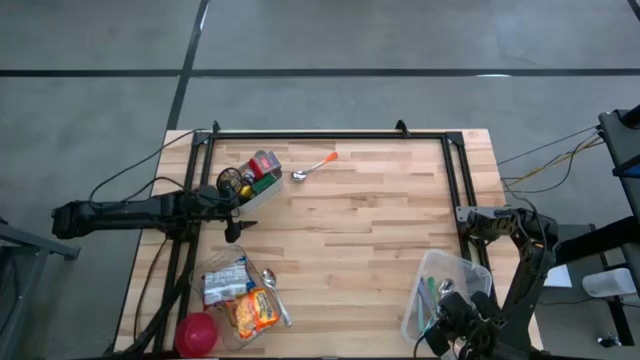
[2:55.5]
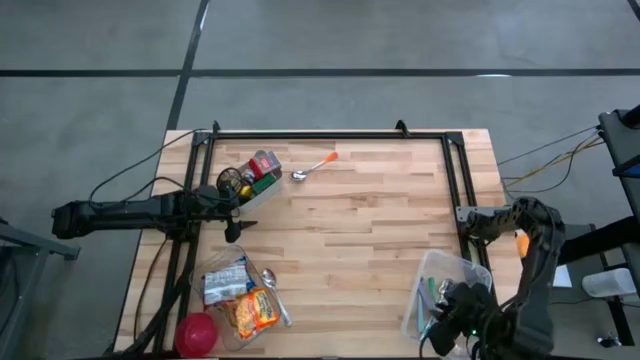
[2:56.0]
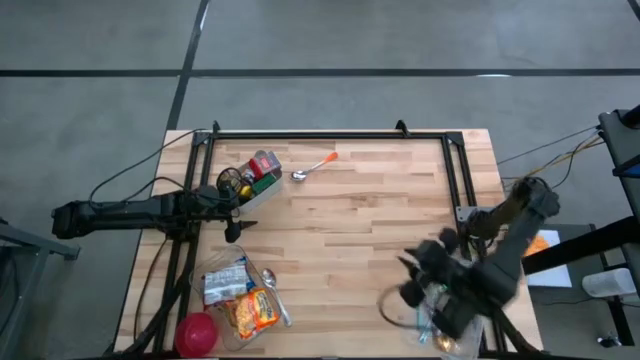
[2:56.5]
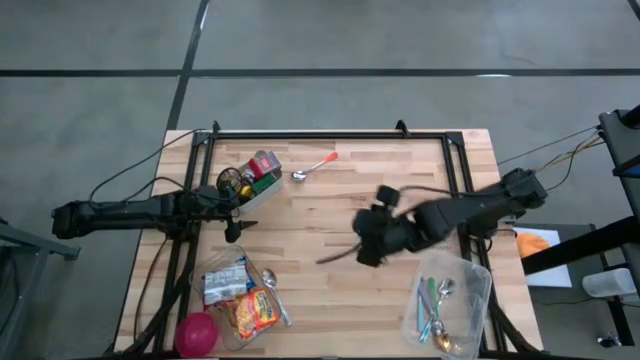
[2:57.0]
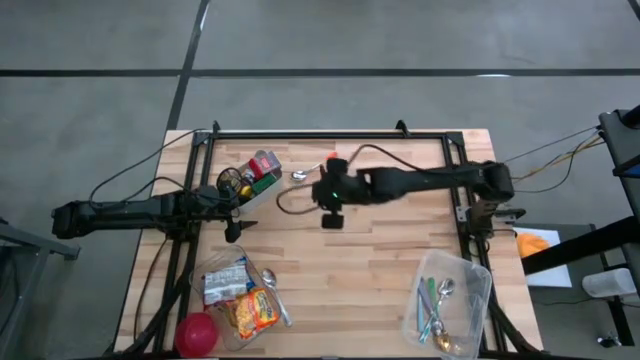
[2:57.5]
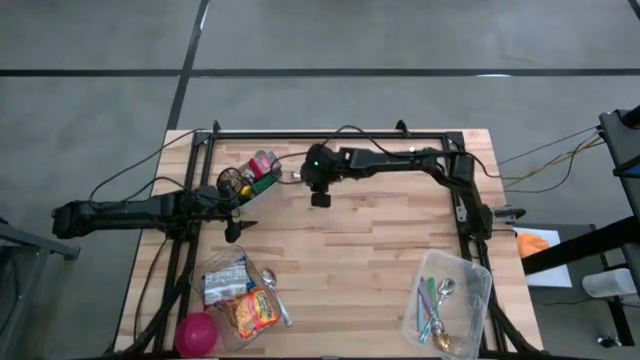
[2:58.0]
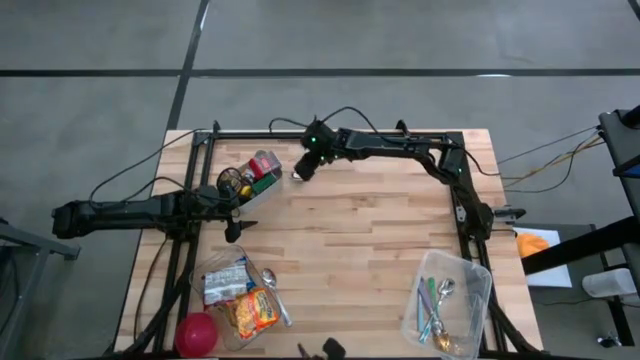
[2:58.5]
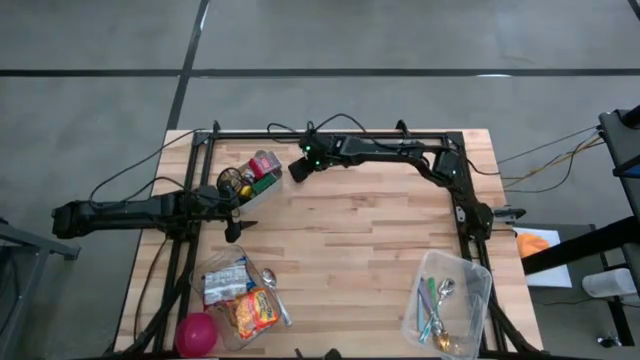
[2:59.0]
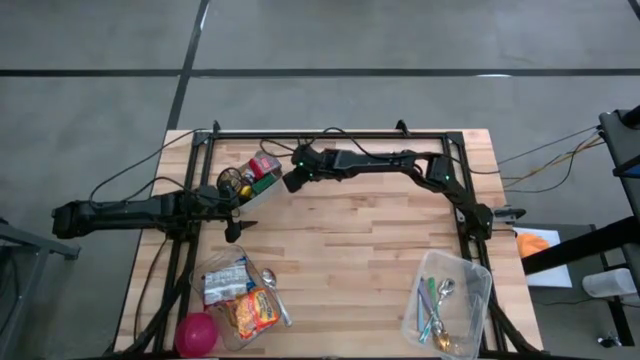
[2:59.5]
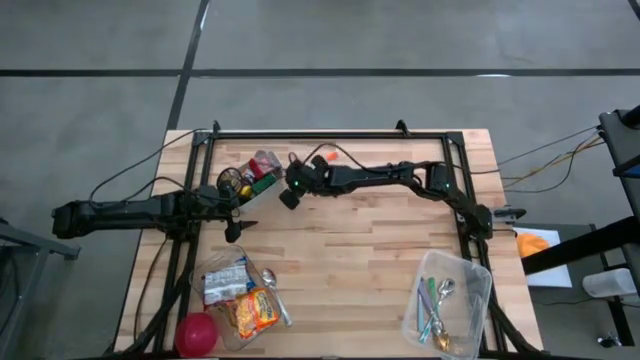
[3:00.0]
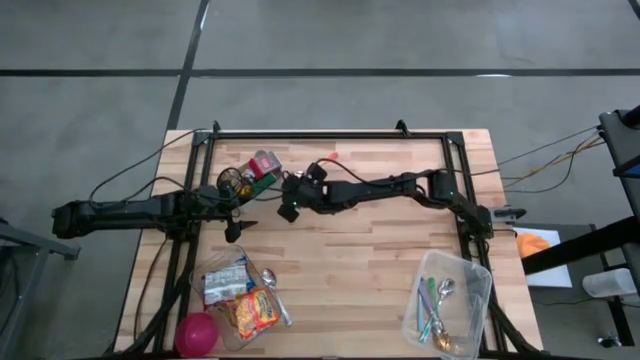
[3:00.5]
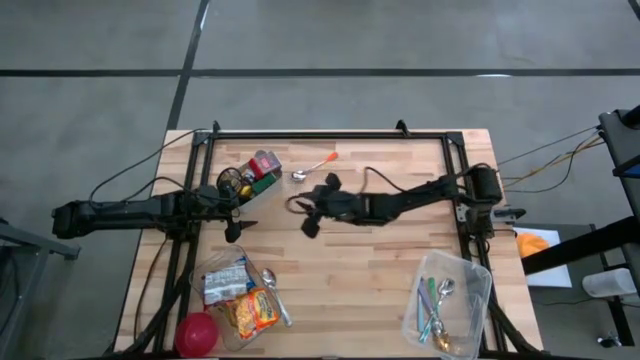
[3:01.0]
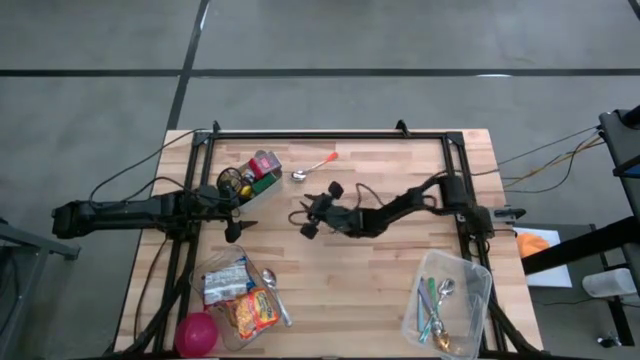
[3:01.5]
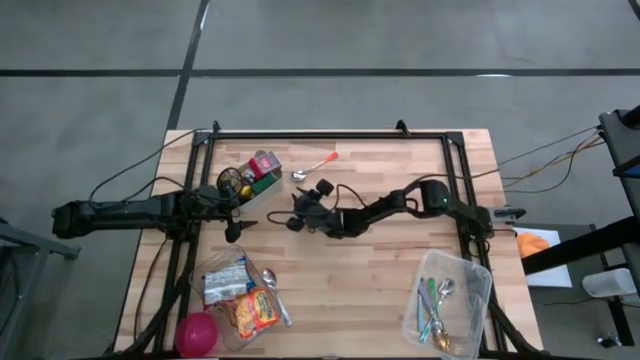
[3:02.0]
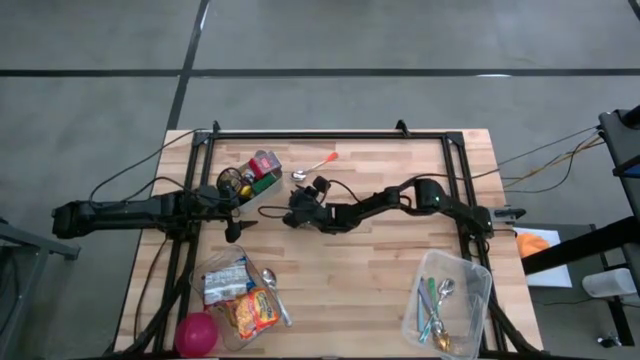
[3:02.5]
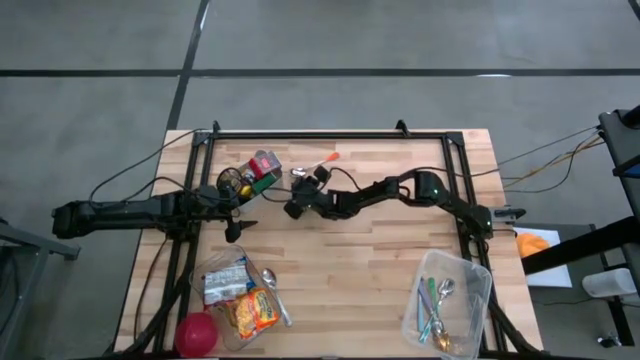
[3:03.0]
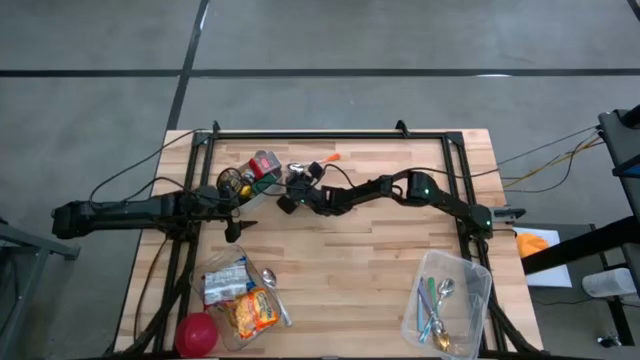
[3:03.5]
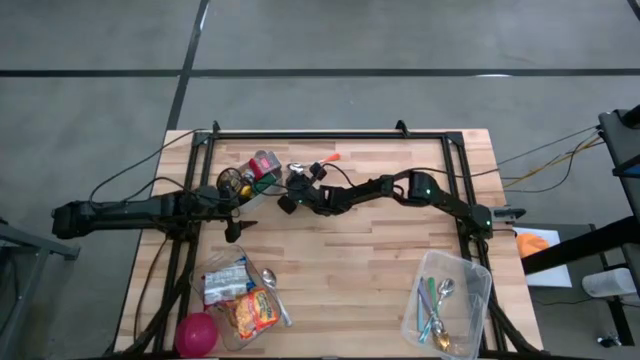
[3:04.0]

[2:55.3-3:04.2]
Put the orange spoon into the white bin

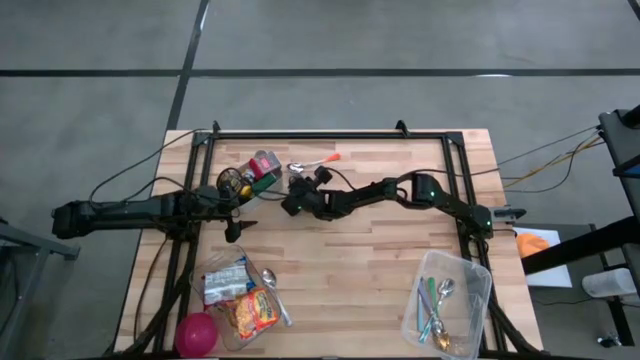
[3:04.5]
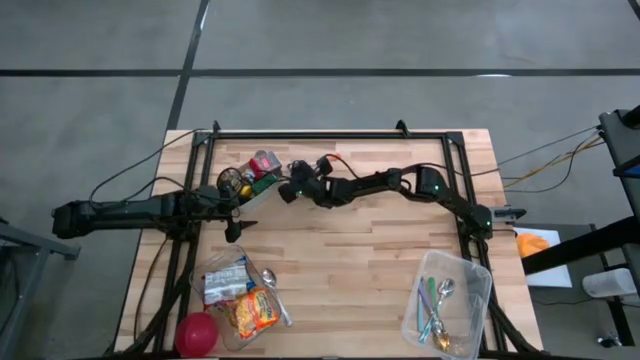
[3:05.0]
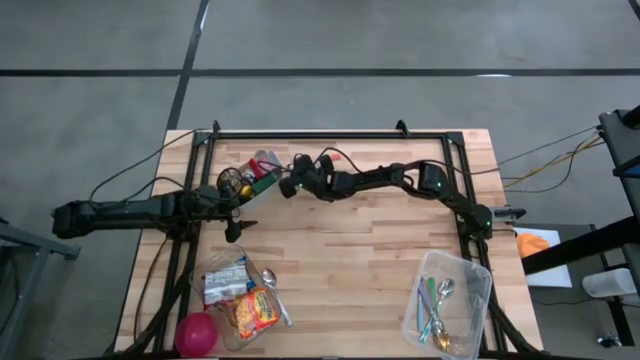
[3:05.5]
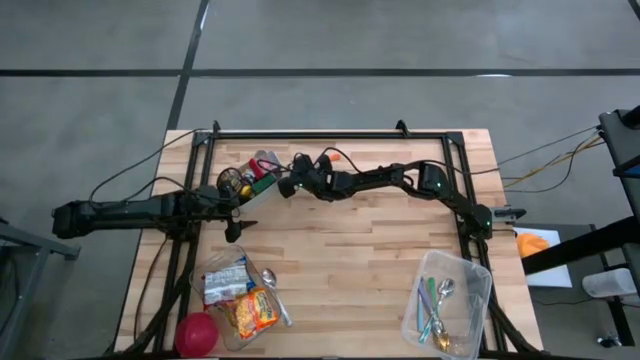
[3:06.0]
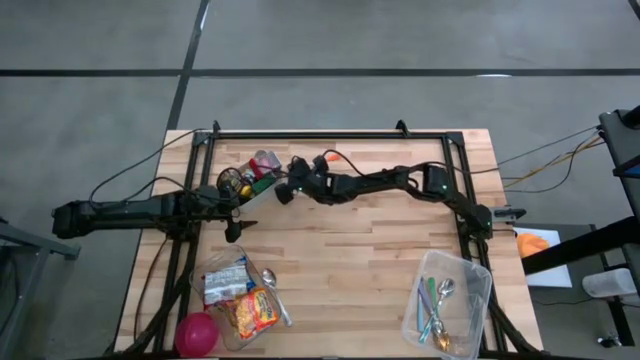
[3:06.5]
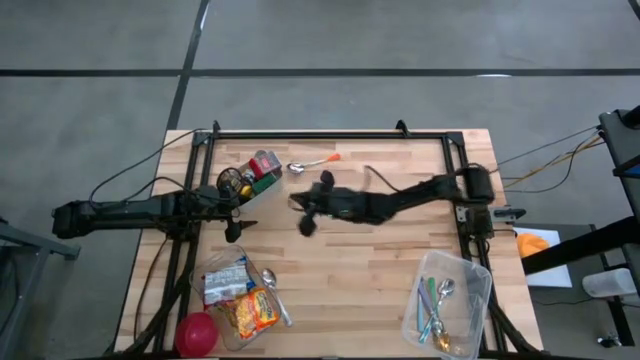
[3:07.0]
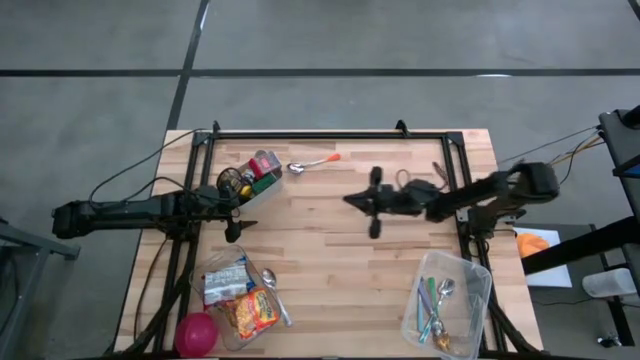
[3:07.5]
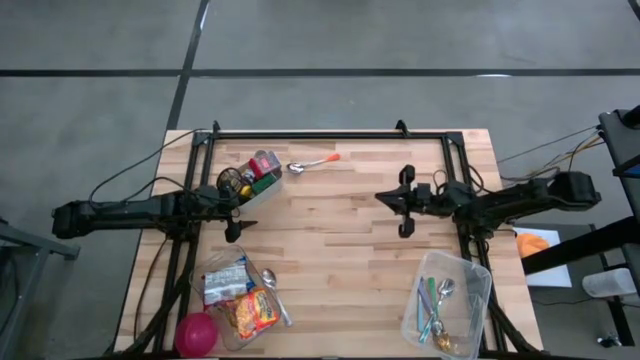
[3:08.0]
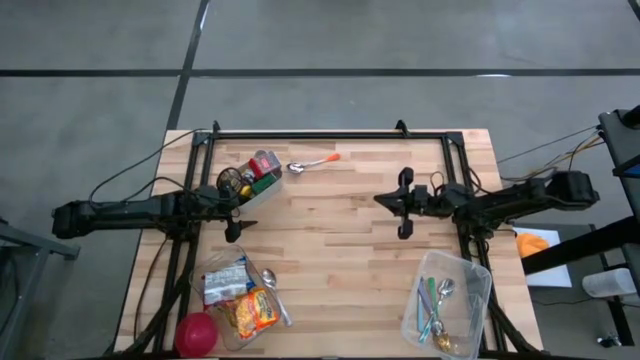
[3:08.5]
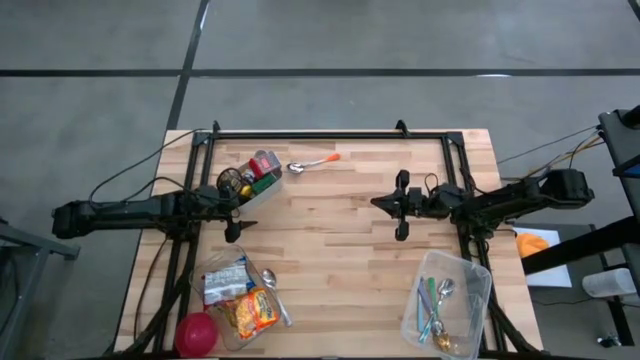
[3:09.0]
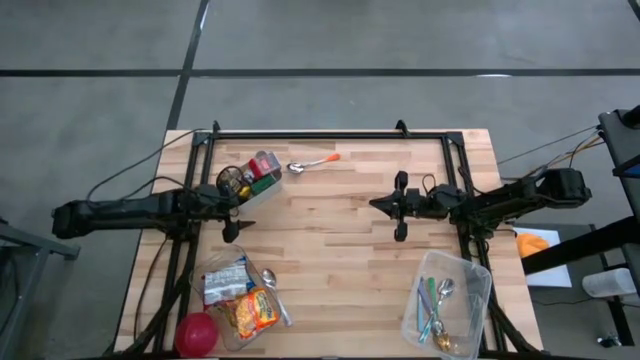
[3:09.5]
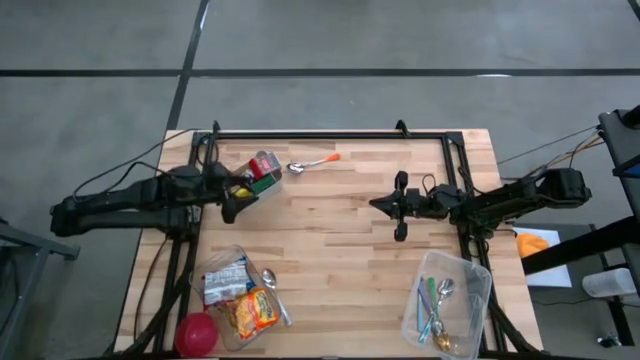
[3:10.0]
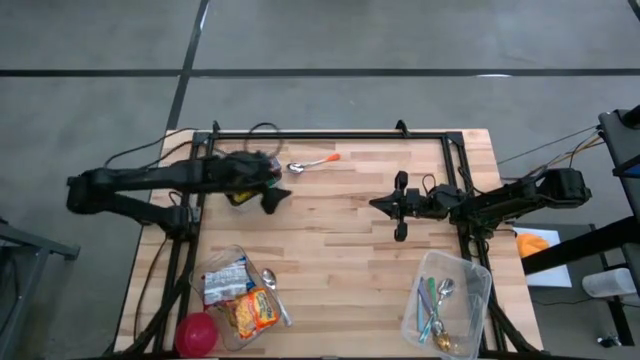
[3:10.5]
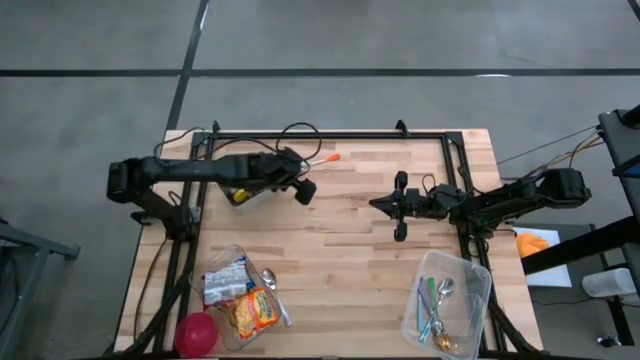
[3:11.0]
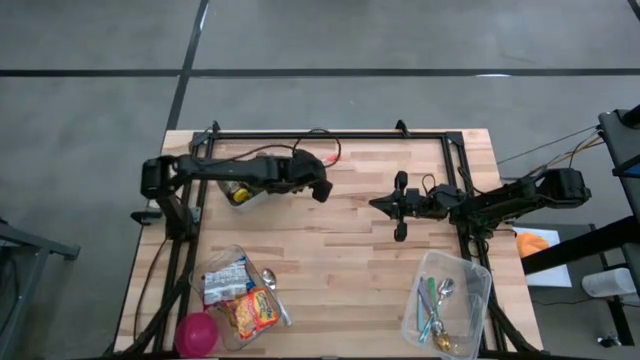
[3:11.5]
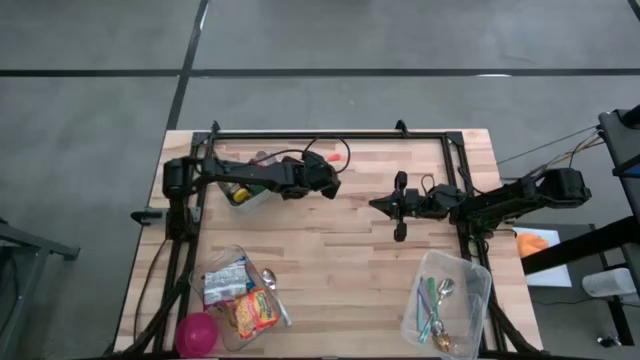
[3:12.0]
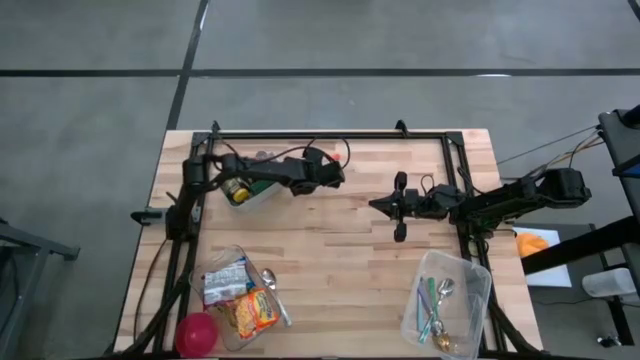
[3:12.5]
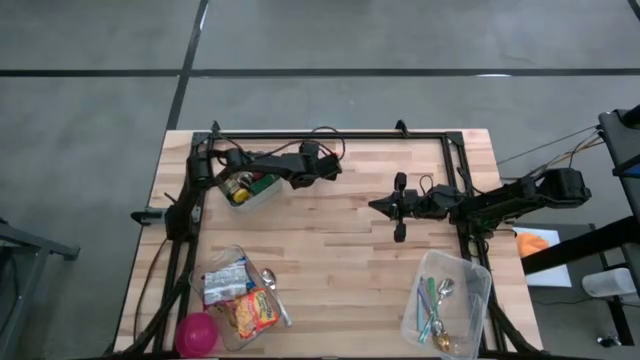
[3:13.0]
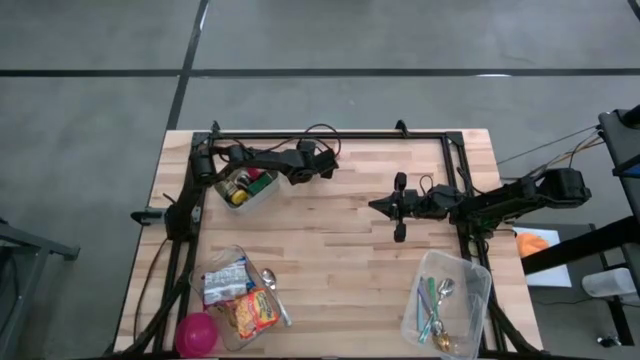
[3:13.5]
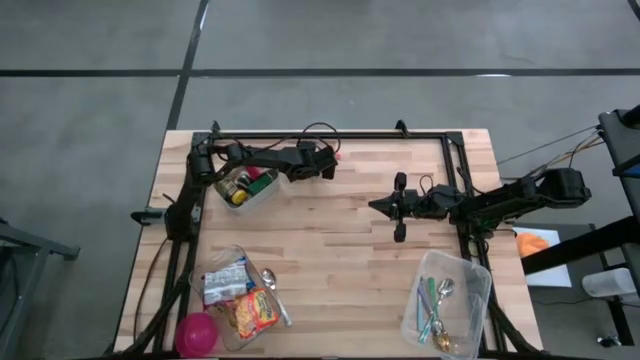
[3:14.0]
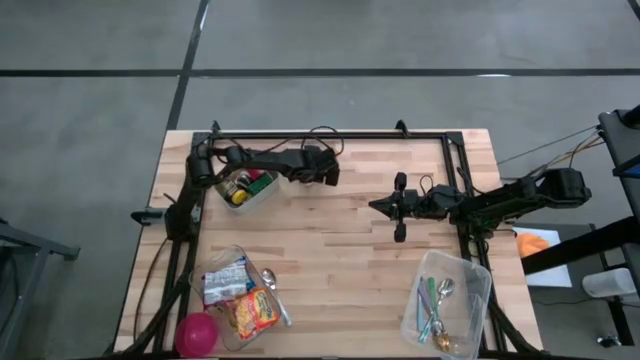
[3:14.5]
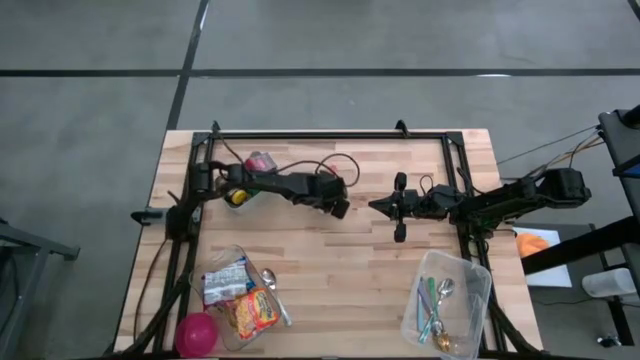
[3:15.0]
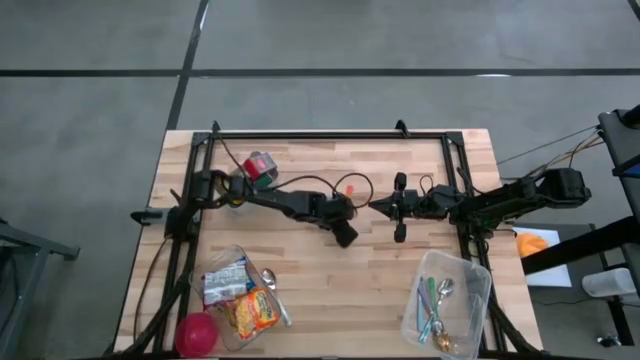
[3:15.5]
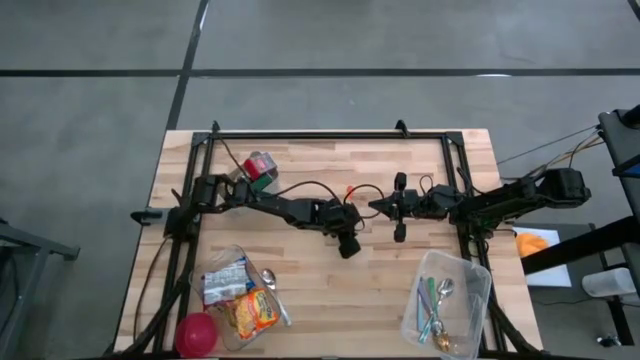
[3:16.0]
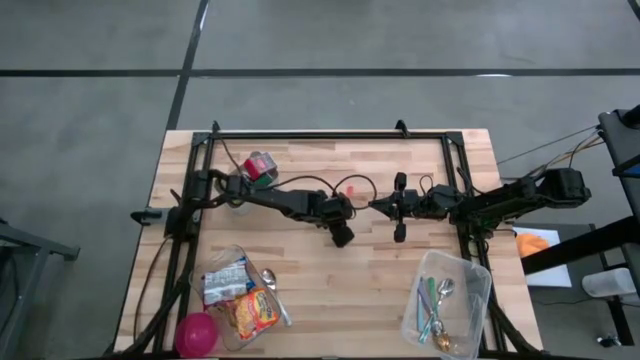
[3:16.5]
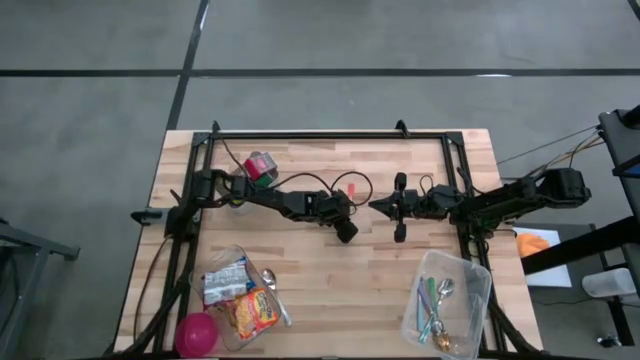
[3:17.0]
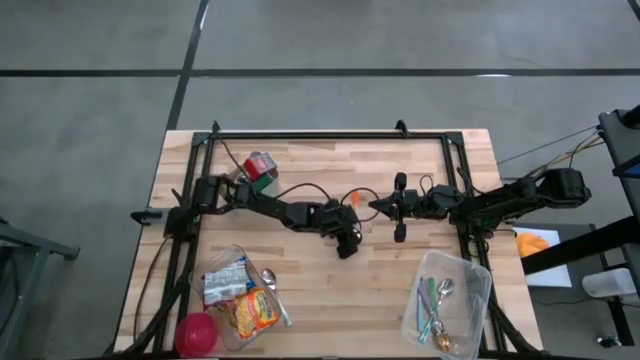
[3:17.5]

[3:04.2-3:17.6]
Put the orange spoon into the white bin
